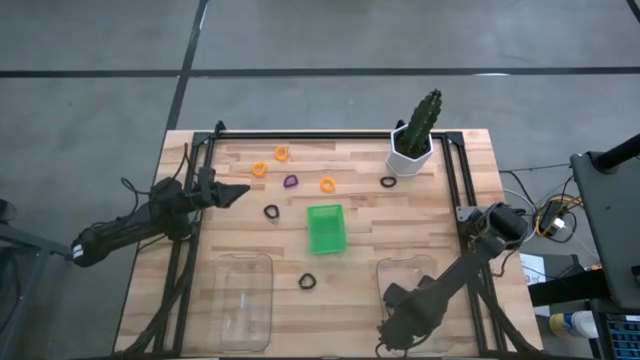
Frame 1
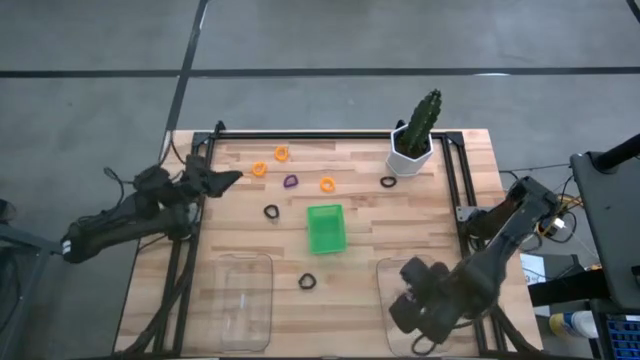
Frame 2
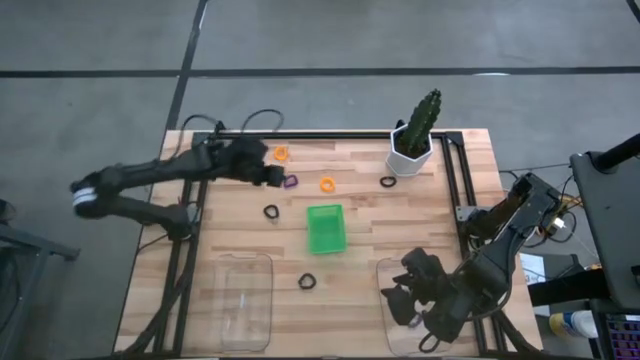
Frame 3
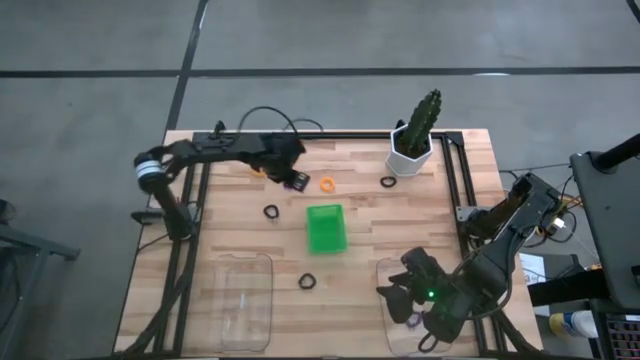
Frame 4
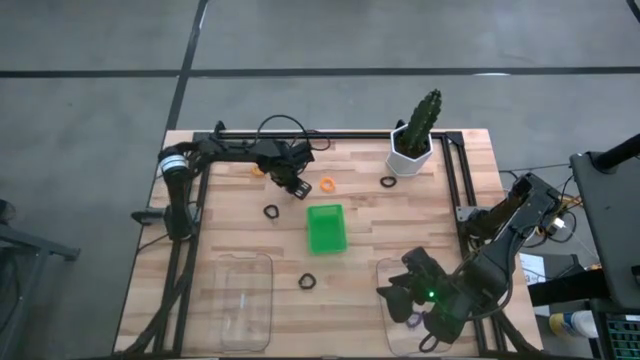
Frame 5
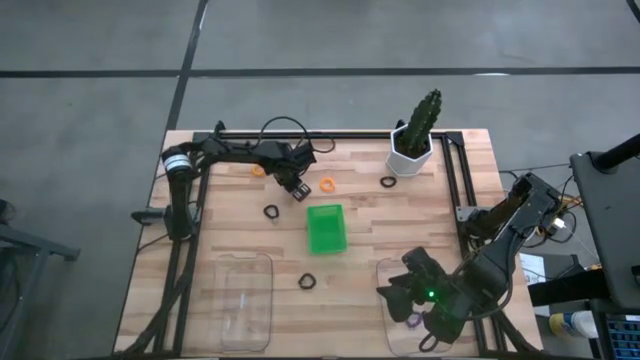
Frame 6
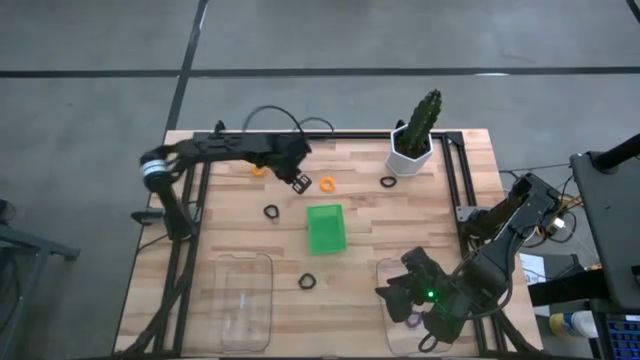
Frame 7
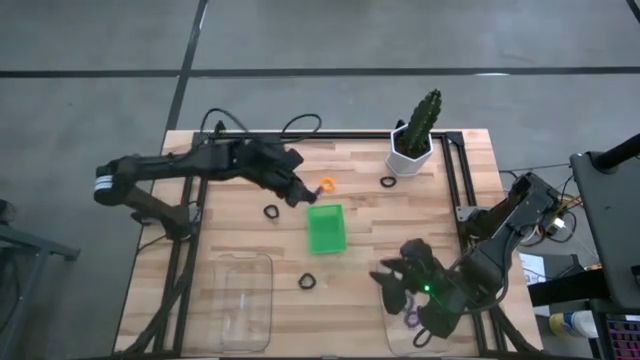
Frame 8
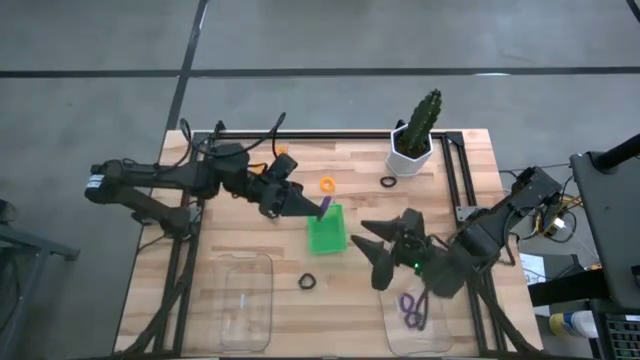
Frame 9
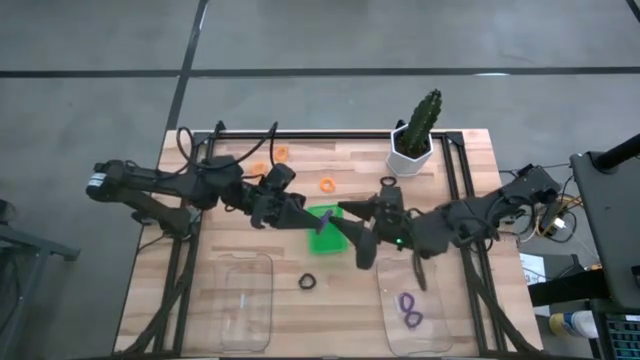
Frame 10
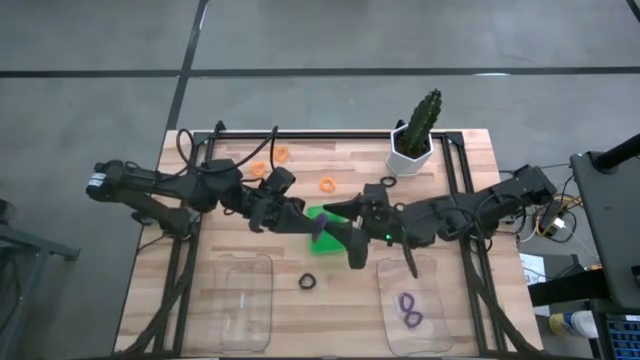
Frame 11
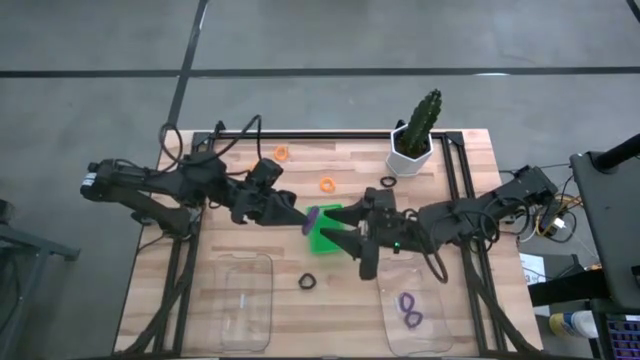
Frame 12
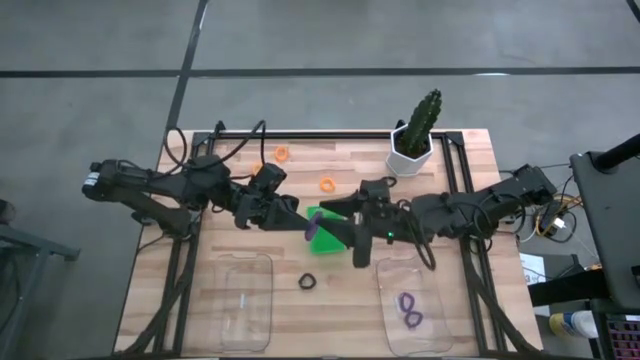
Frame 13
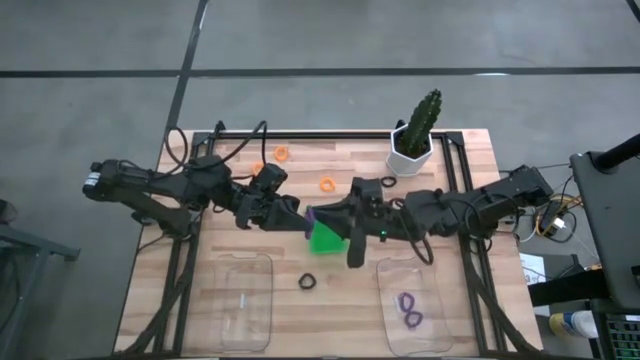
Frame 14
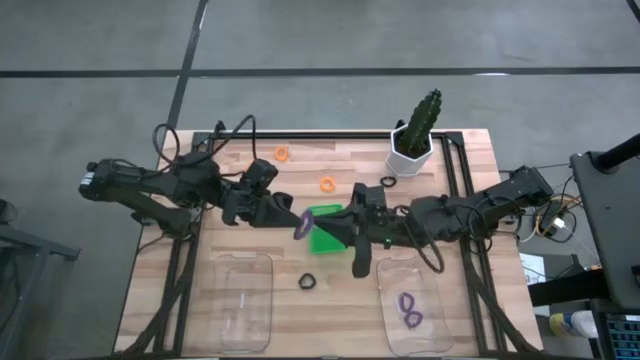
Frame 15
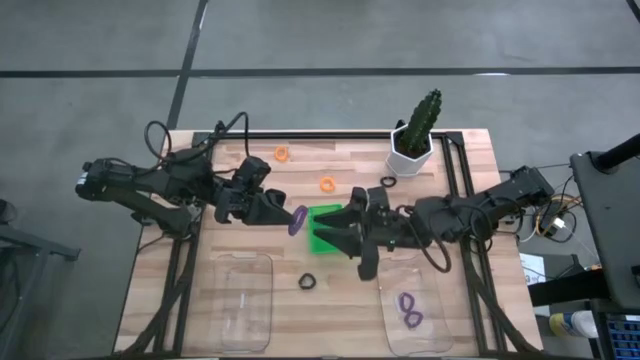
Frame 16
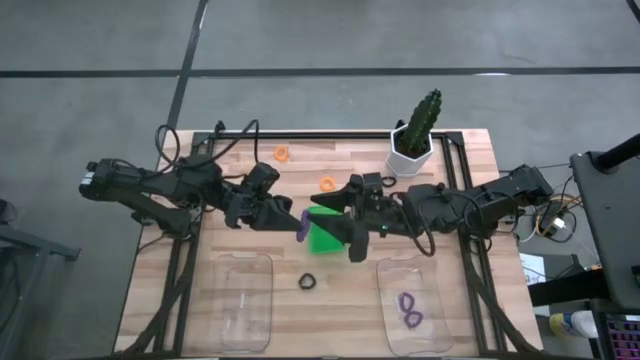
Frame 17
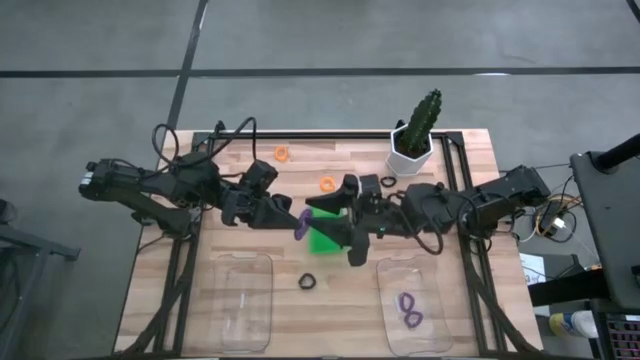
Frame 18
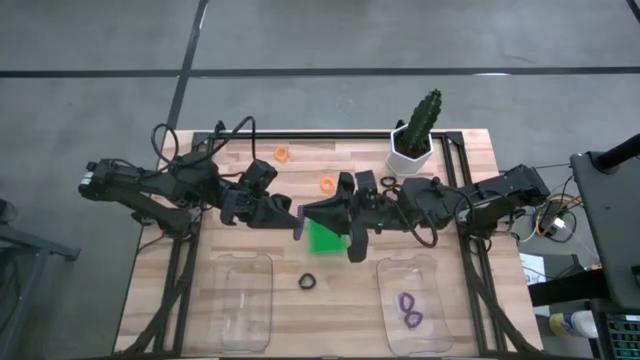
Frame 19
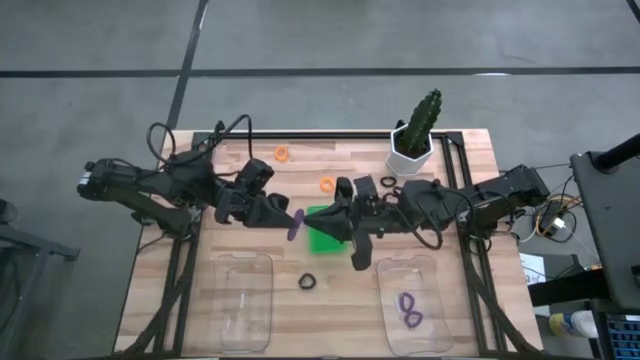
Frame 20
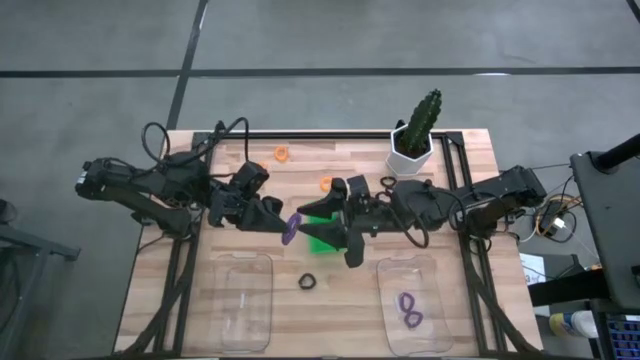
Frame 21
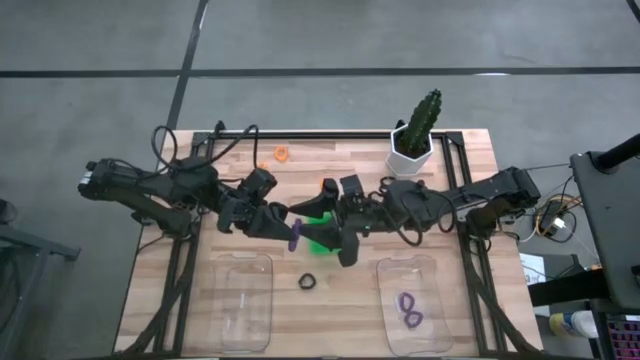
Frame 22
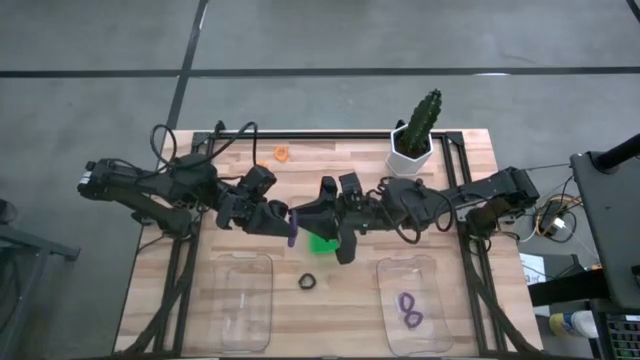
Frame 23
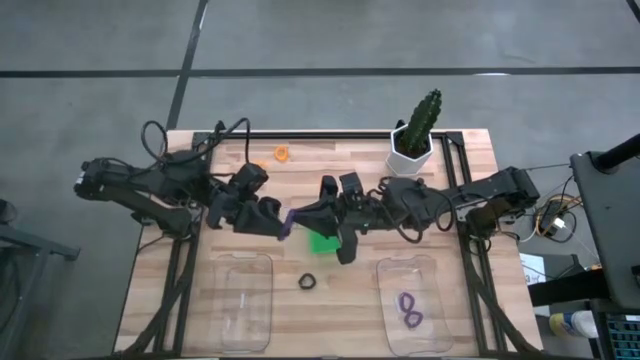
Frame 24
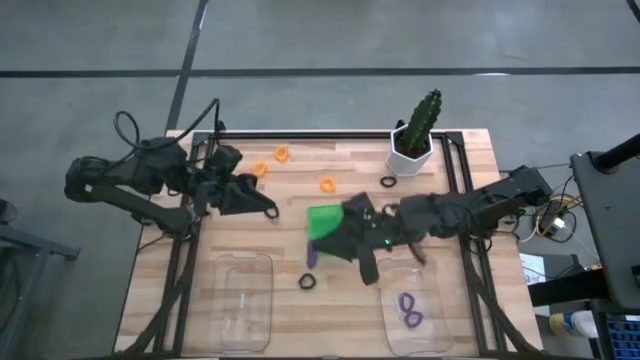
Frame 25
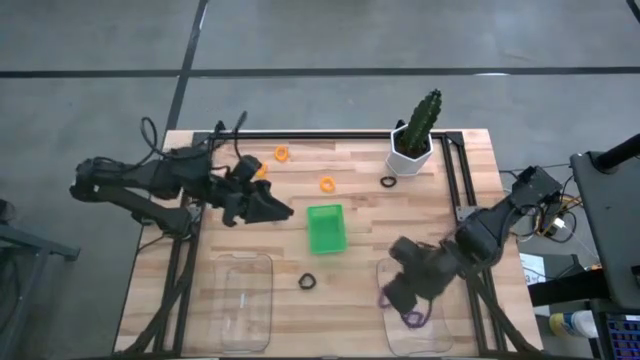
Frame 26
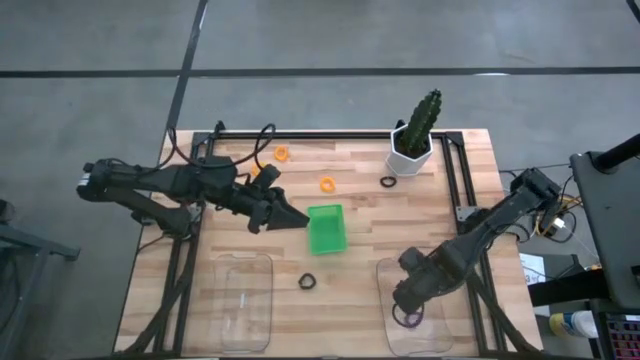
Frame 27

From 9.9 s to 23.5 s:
Task: Sort spring keychains
Put the purple spring keychain into the right transparent bin

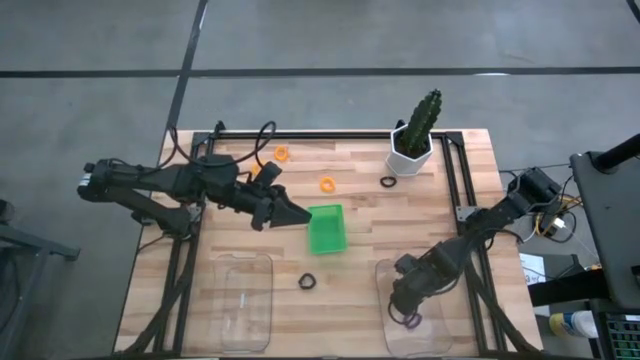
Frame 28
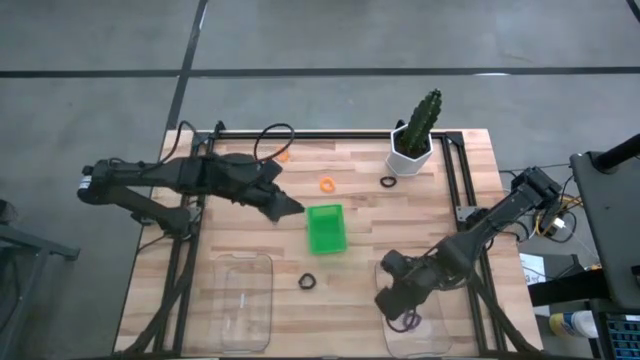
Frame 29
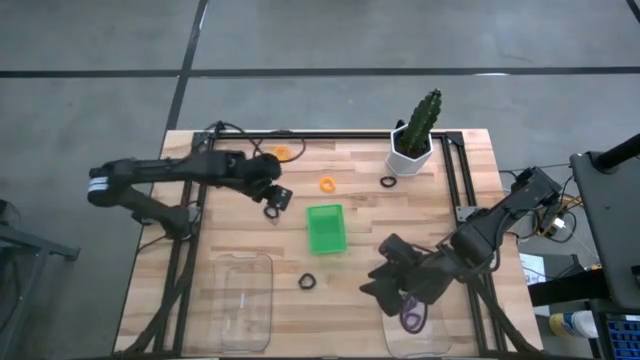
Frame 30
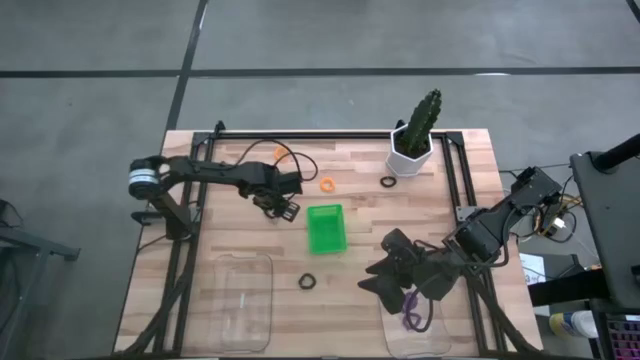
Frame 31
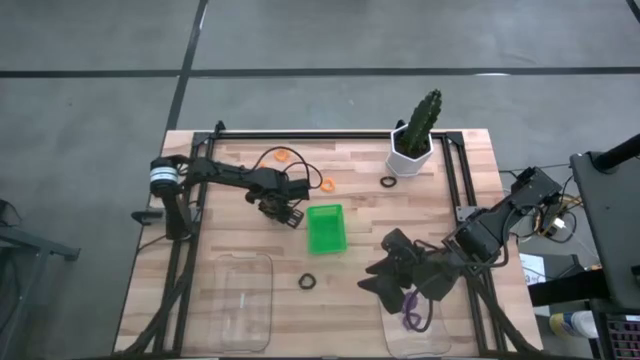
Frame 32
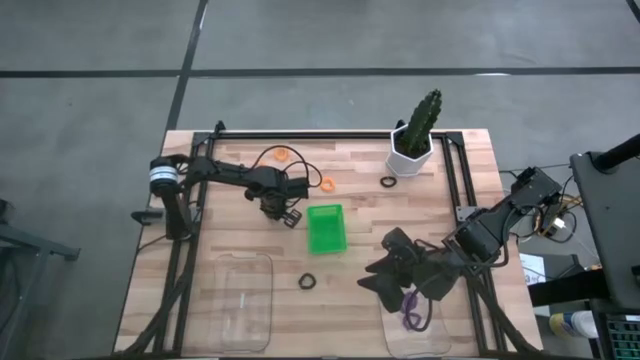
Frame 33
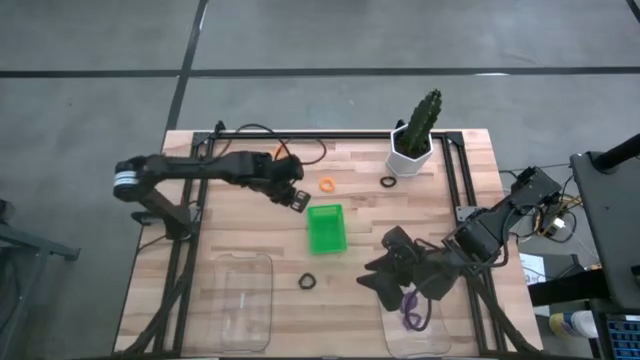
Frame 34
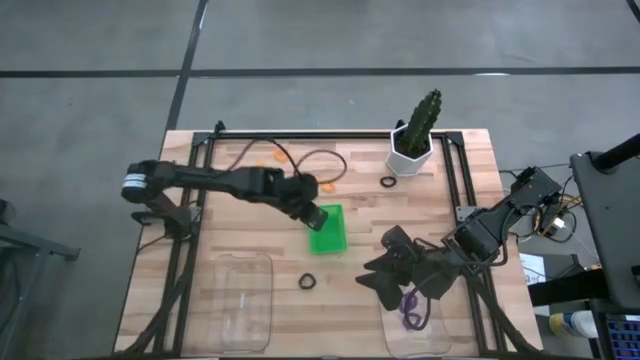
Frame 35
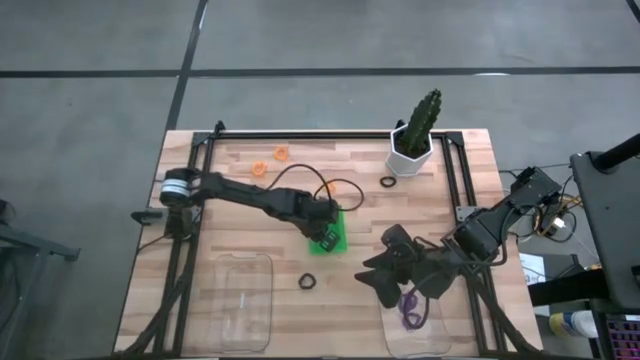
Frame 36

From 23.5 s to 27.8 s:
Put the middle black spring keychain into the green bin

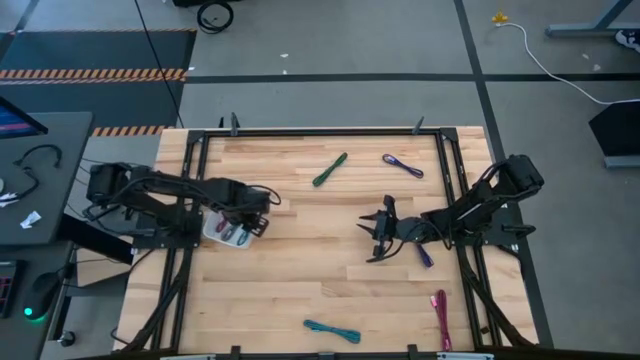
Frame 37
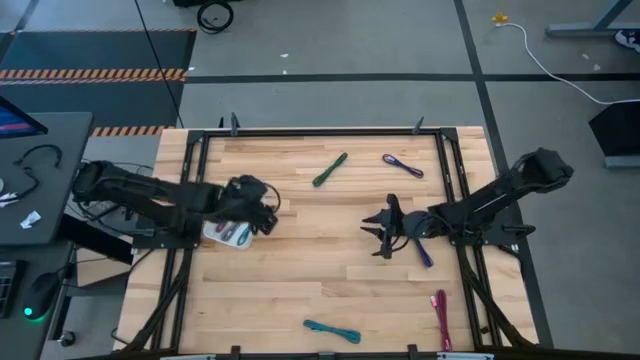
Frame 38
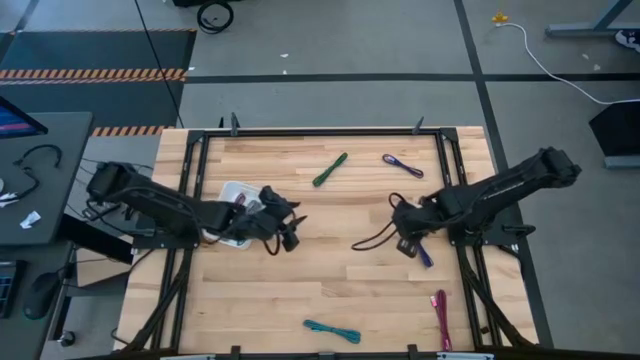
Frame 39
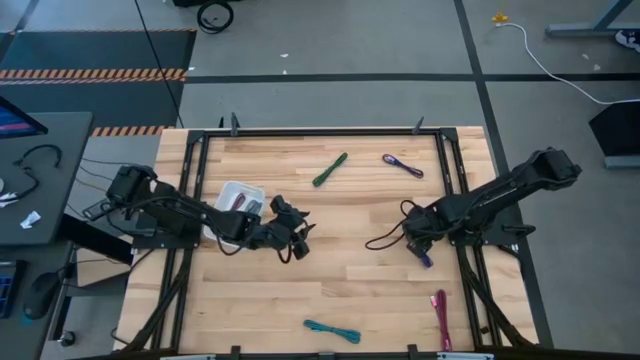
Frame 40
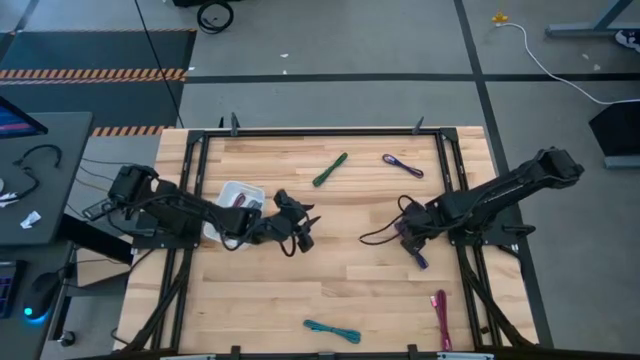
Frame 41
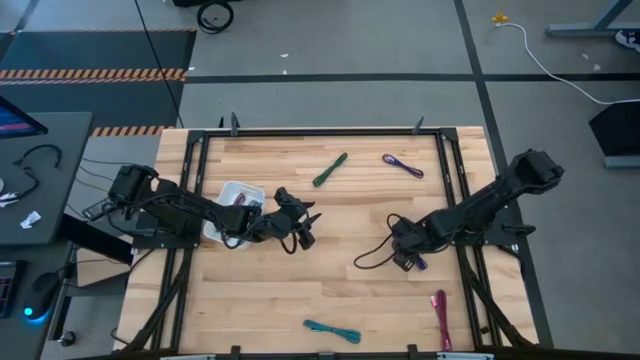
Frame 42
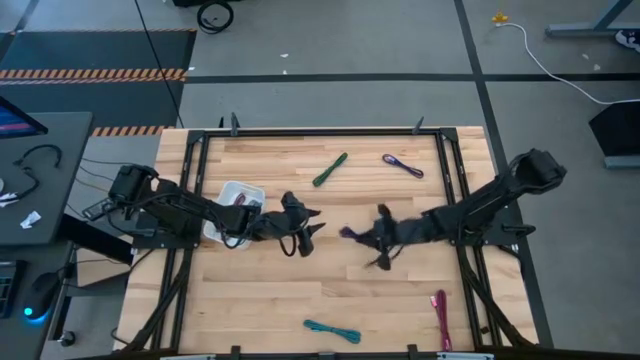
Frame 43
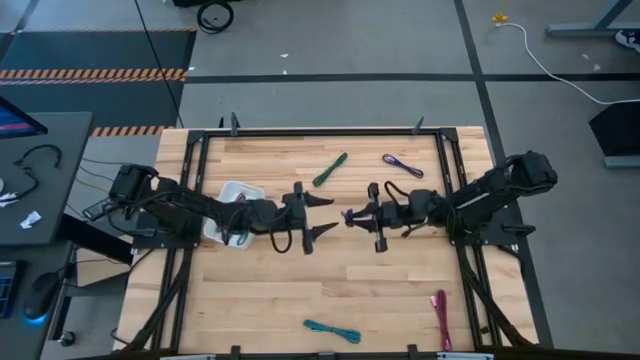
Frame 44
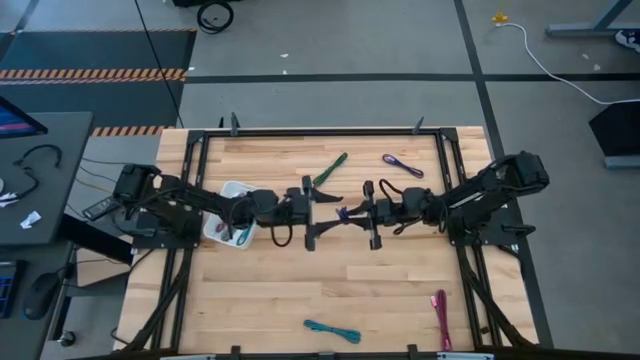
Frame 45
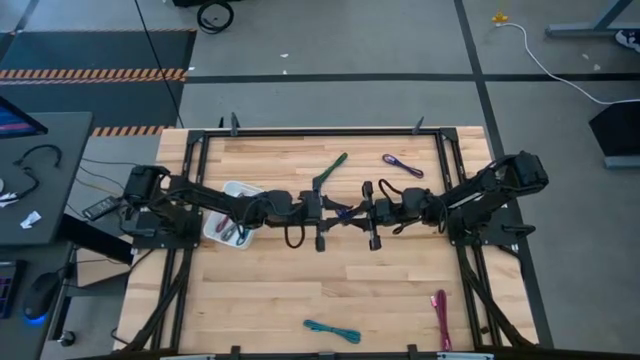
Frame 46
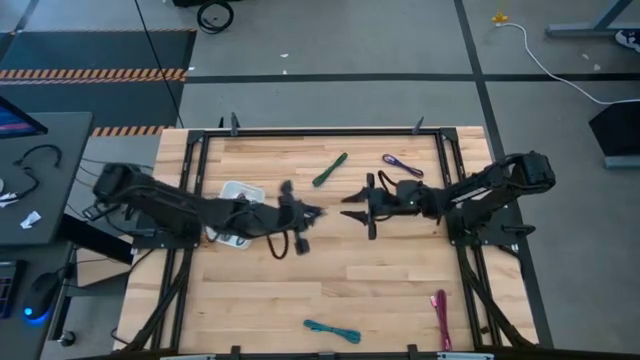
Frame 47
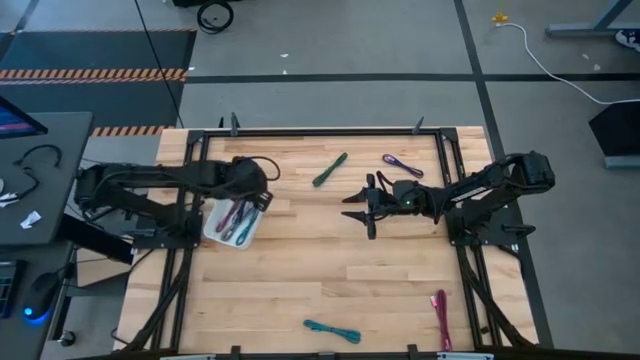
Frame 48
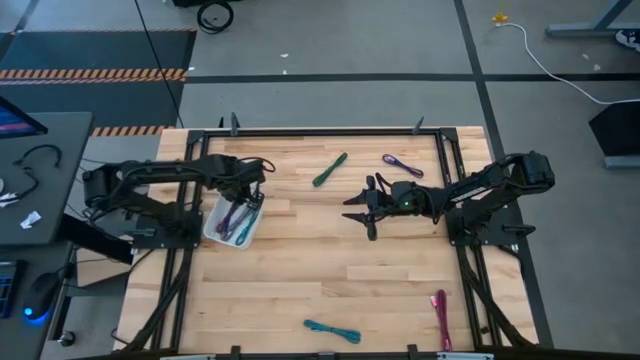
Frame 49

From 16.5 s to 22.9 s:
Task: Pick and place USB-C Cables
Put the bottom violet charger cable into the white bin
